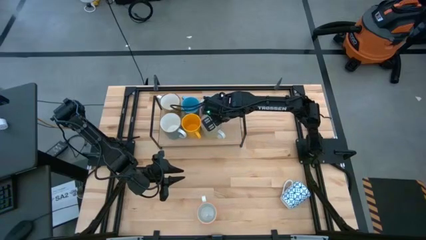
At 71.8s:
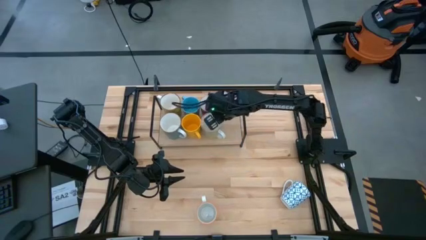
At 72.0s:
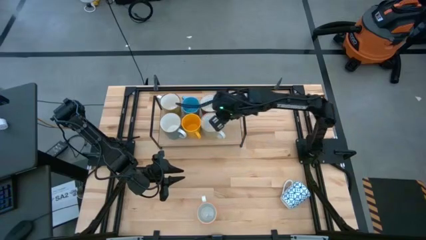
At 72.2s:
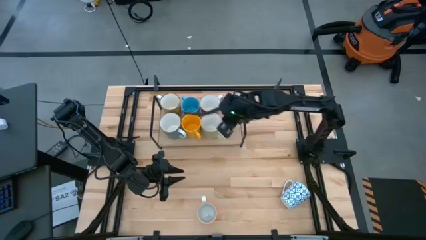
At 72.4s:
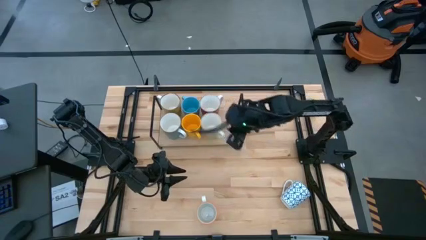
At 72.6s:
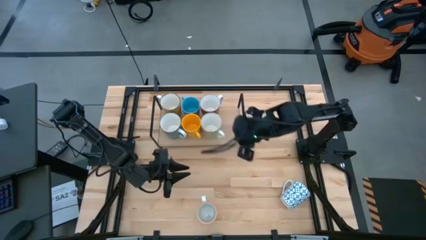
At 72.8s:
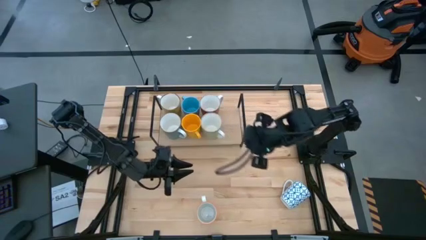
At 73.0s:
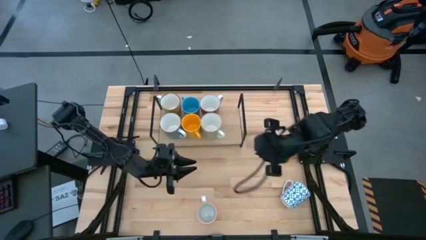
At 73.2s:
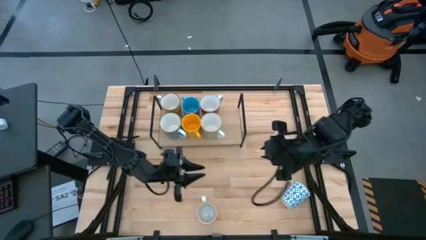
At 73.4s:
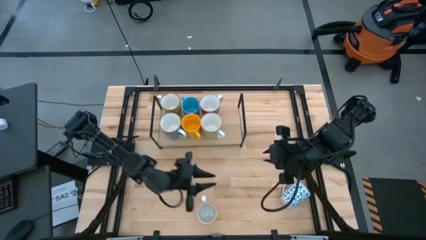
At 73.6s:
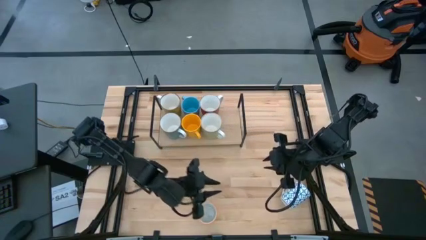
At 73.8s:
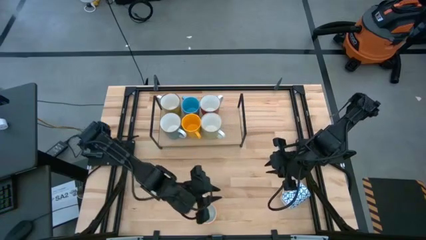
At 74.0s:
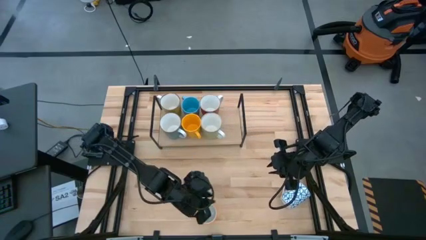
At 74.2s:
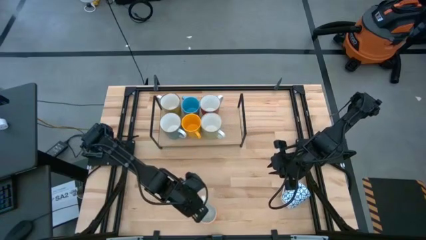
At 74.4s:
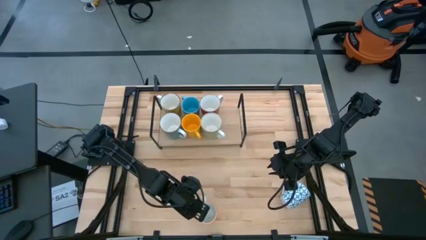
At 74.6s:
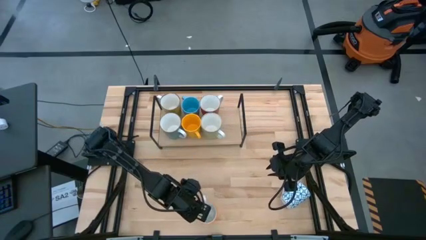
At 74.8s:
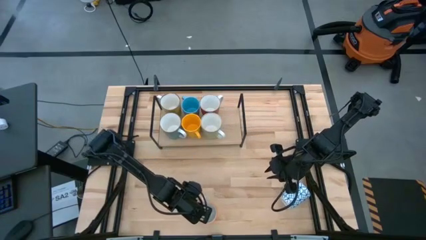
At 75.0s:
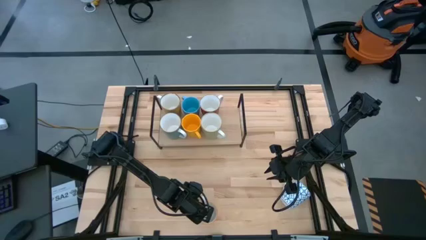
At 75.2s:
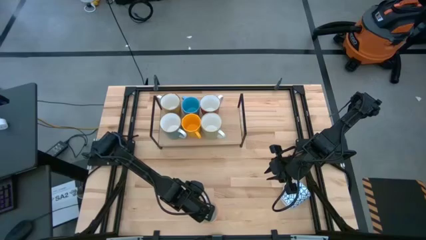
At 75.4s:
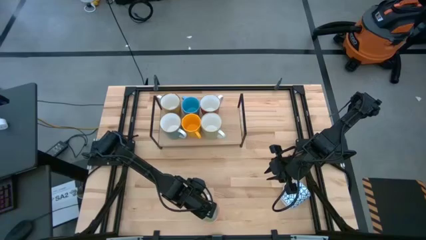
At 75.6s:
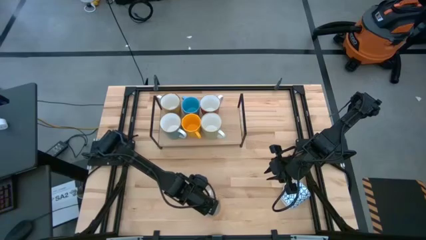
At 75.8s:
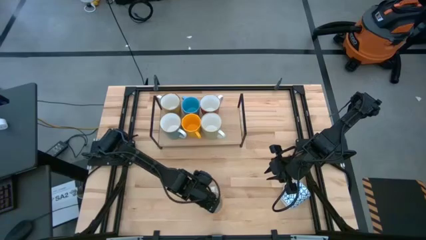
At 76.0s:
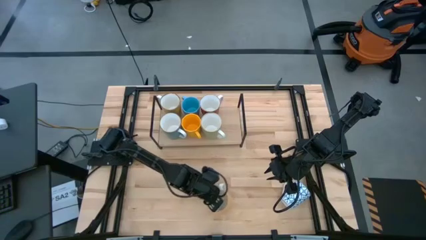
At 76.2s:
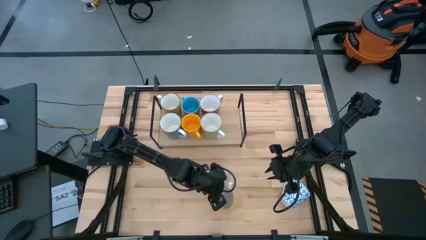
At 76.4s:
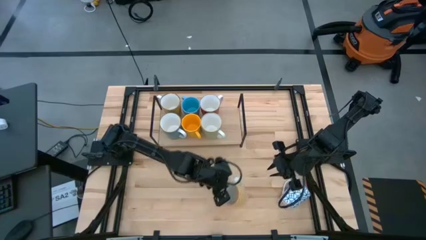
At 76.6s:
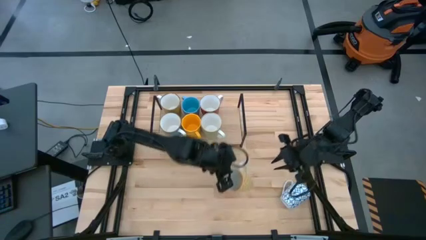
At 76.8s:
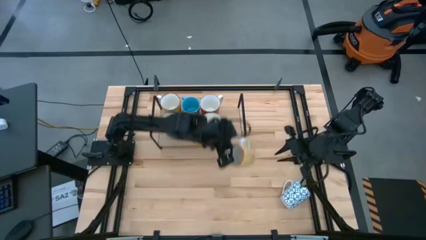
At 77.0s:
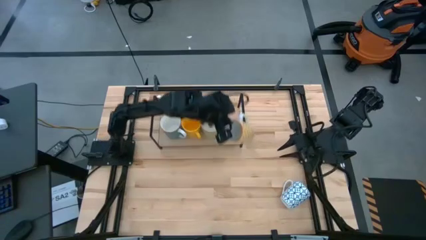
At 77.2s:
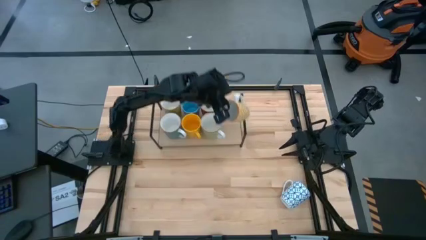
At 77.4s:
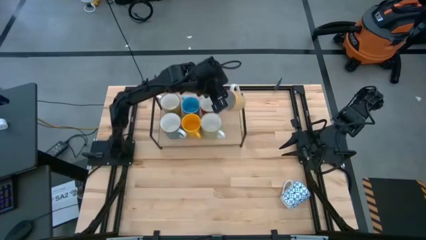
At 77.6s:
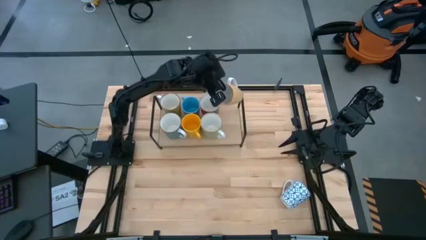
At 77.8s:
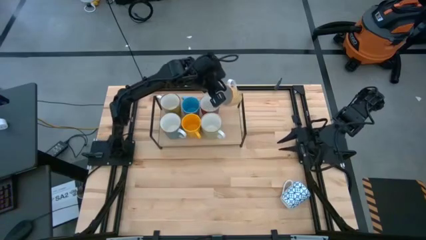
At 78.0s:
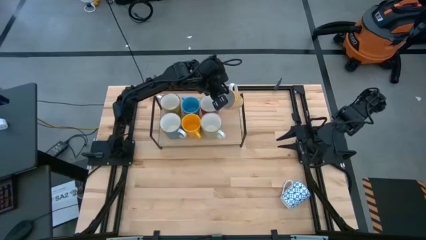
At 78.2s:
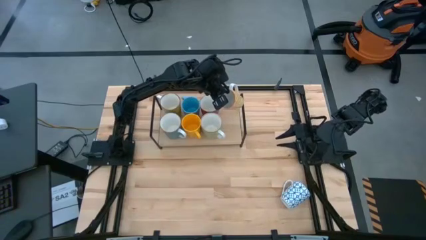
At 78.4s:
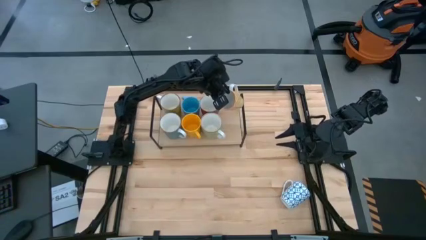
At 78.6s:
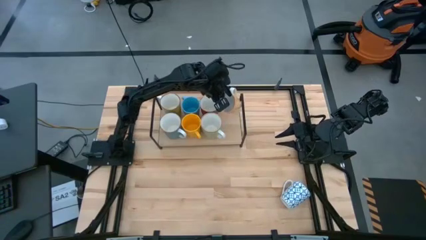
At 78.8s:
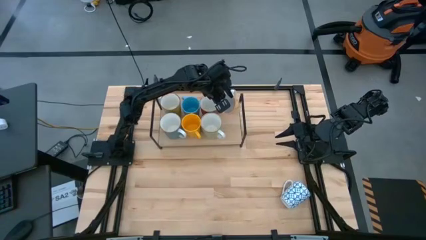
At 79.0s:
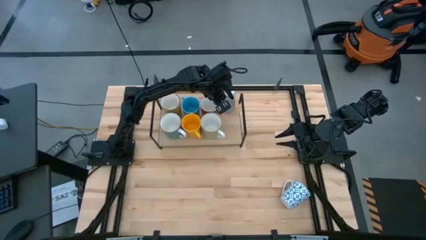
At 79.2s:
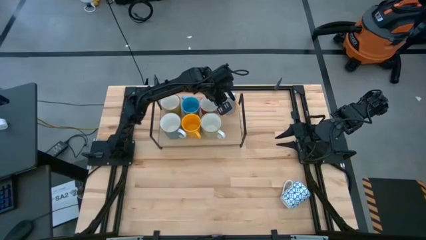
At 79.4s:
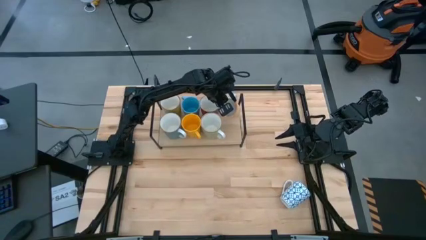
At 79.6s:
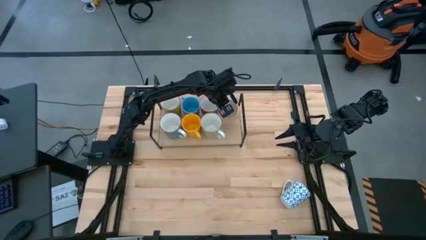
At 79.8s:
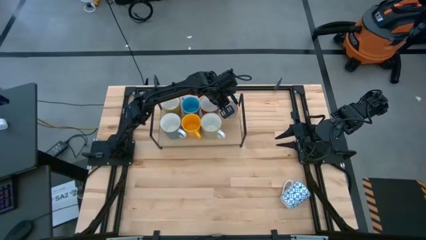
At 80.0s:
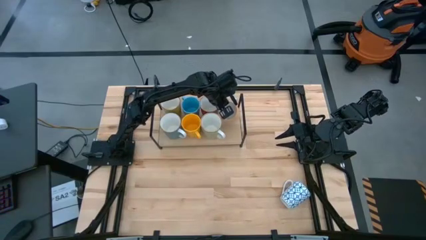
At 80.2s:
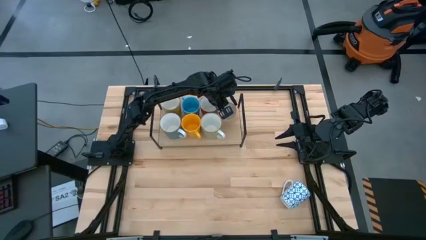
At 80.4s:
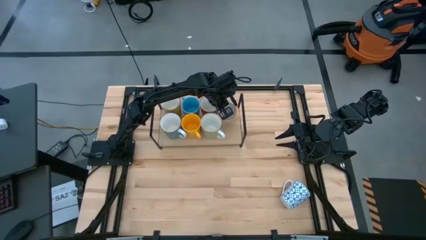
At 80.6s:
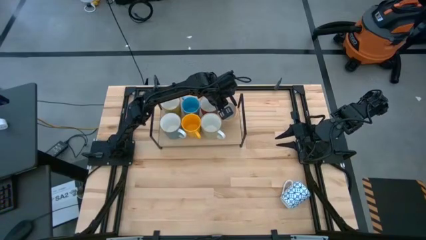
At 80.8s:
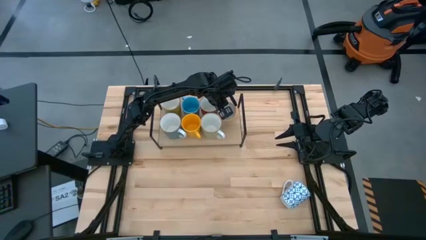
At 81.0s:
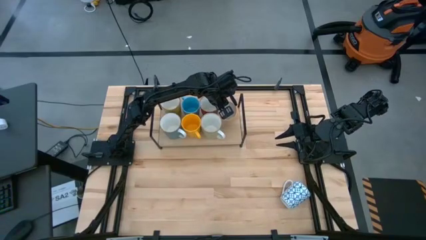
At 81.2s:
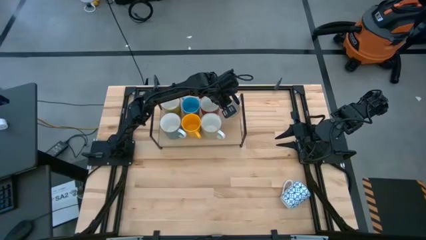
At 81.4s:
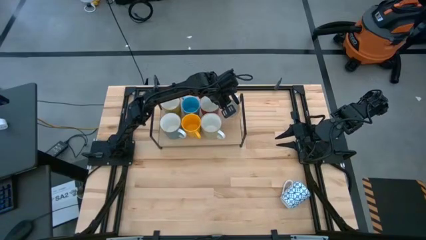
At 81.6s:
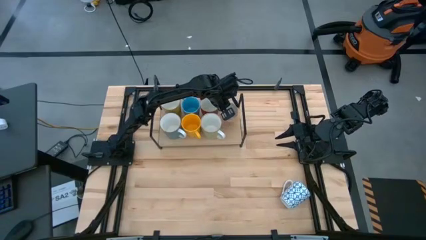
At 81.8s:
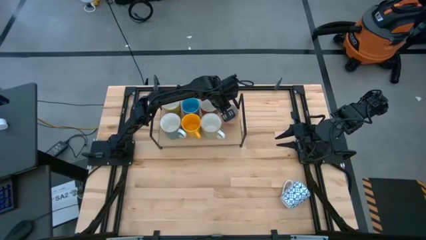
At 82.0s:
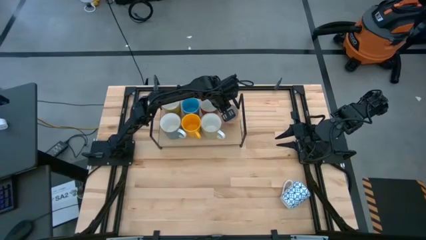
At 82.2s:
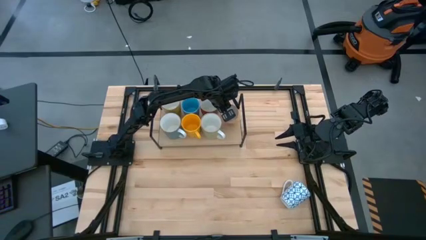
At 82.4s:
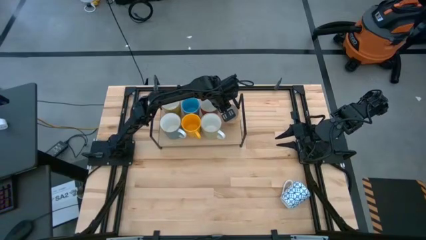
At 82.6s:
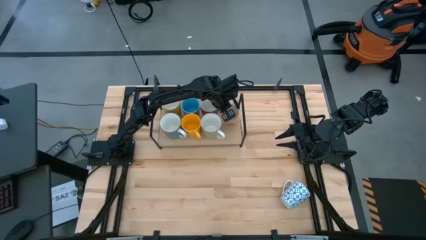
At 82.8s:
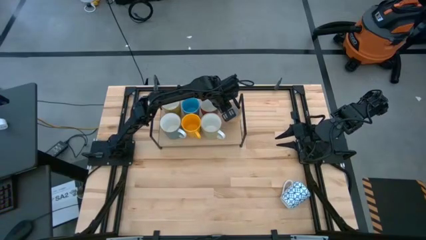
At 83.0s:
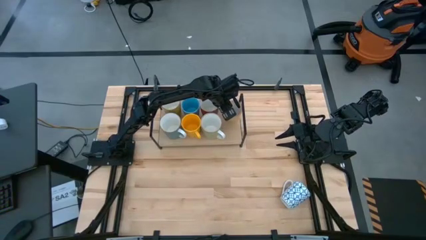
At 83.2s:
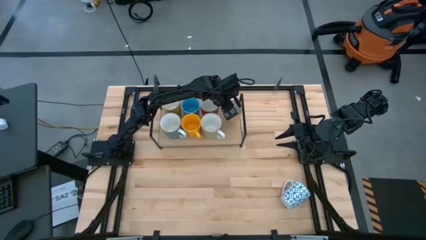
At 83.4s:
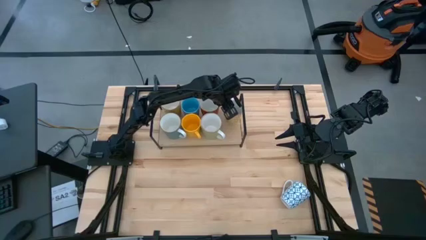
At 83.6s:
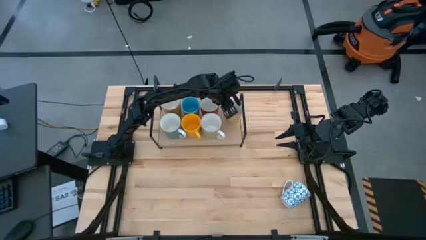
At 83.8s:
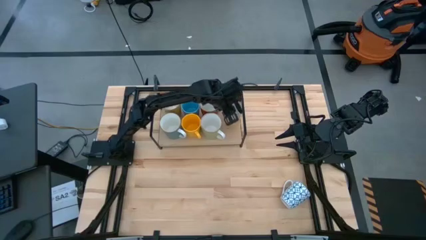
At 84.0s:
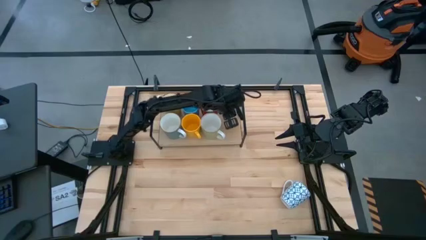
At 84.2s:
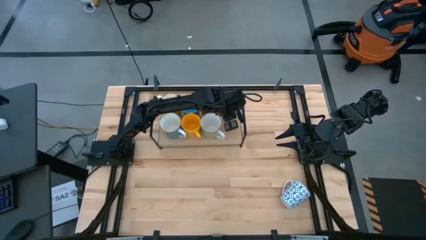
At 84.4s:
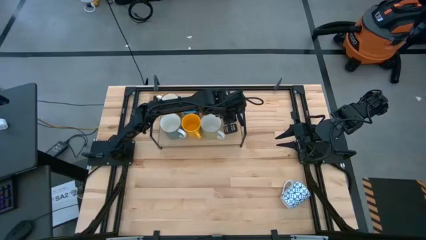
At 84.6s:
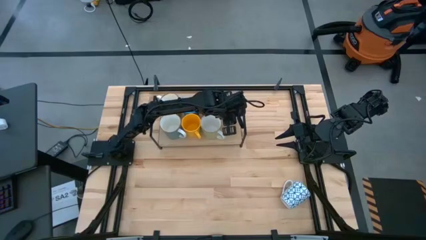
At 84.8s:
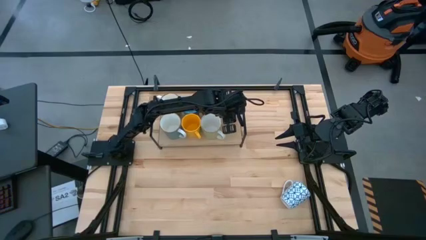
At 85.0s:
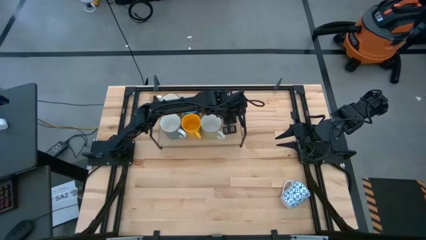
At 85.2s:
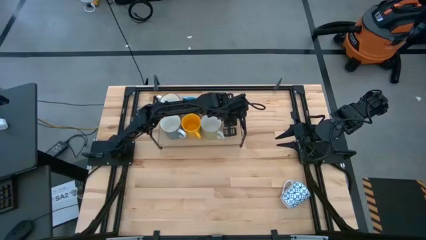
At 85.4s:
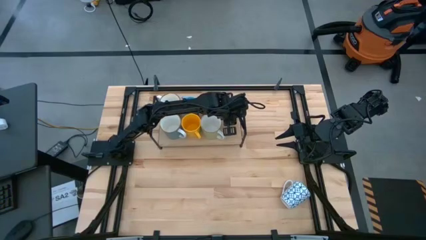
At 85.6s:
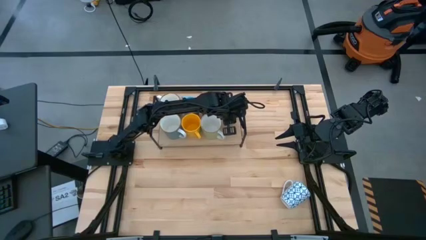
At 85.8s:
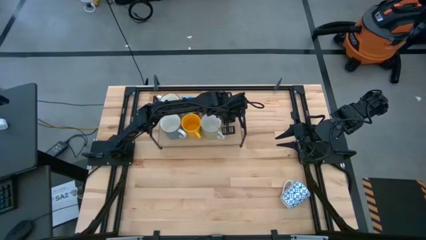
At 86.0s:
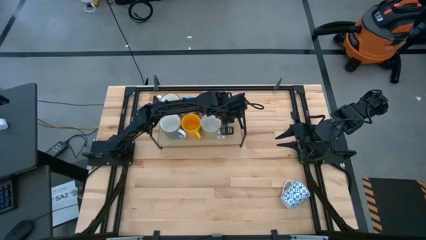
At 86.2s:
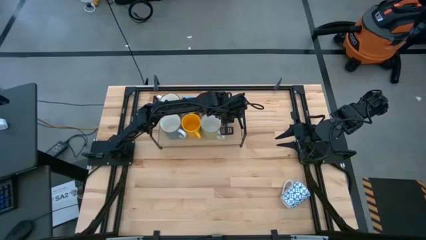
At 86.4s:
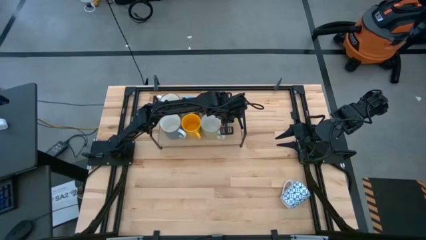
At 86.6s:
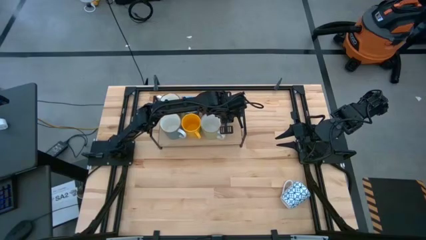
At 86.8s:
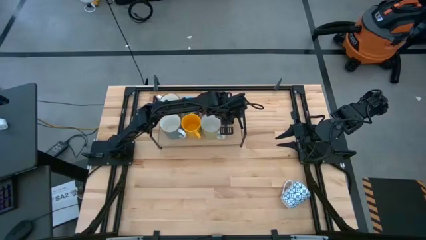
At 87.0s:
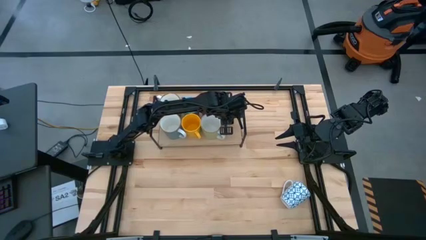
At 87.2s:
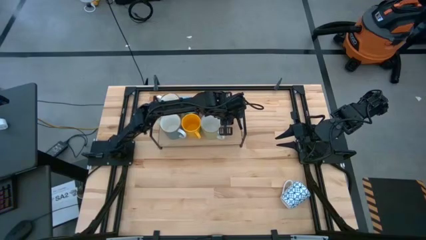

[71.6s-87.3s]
Task: Place coffee mugs
Put the yellow patterned mug on the shelf
